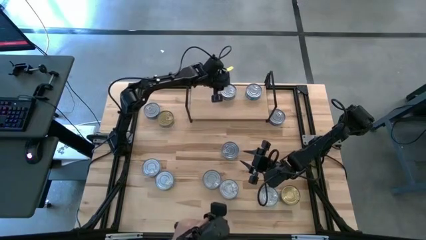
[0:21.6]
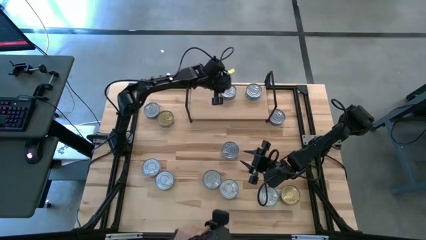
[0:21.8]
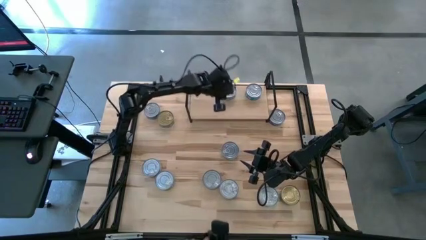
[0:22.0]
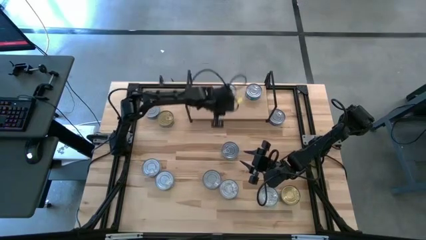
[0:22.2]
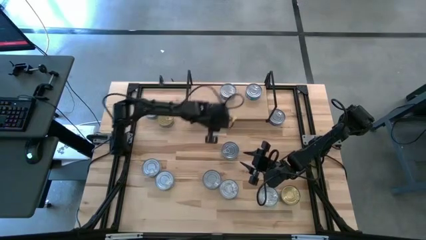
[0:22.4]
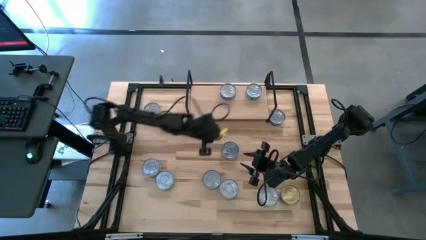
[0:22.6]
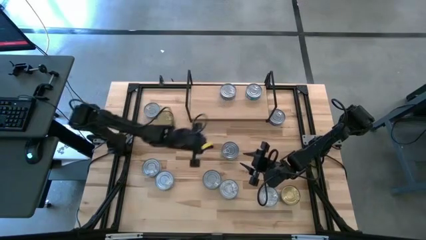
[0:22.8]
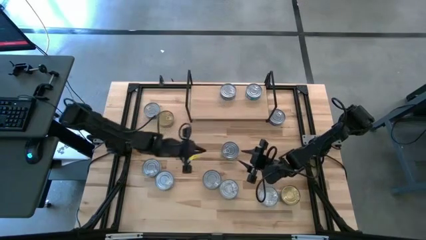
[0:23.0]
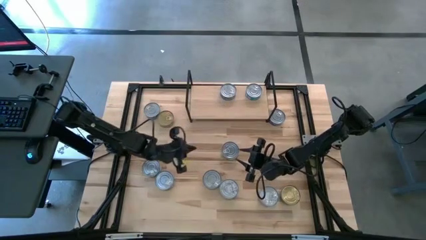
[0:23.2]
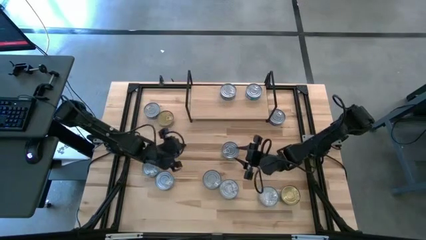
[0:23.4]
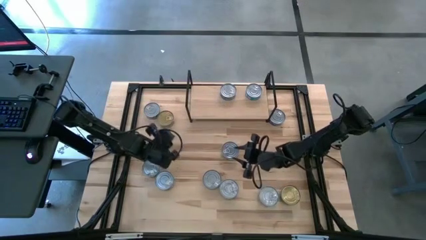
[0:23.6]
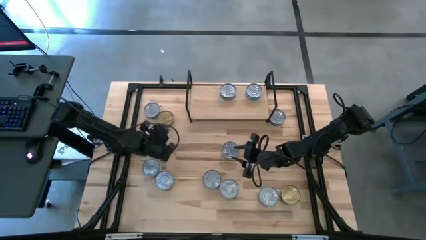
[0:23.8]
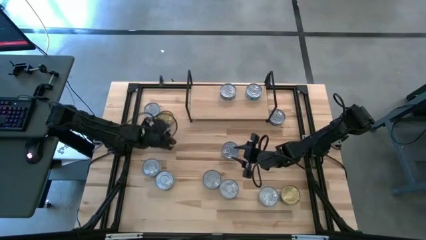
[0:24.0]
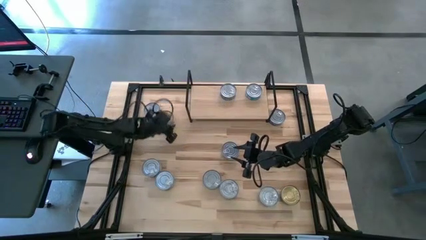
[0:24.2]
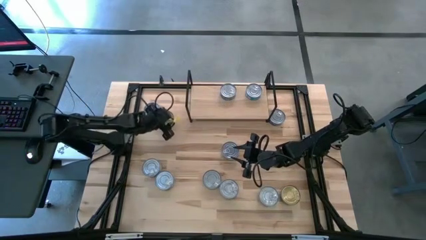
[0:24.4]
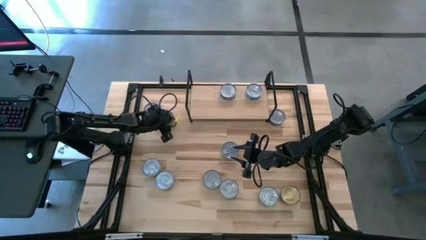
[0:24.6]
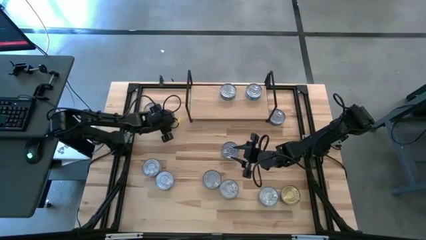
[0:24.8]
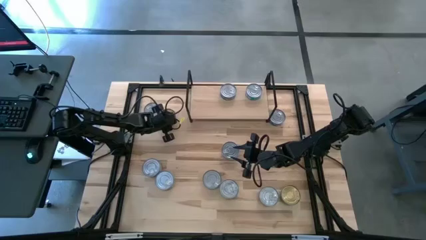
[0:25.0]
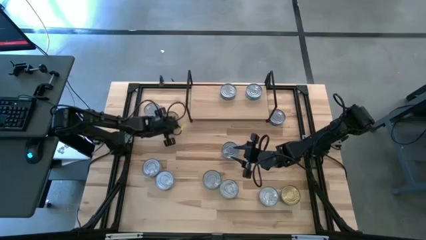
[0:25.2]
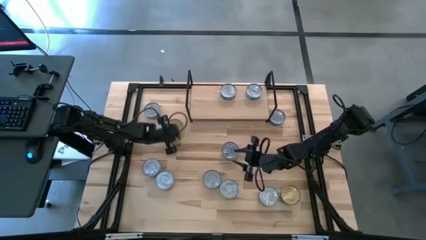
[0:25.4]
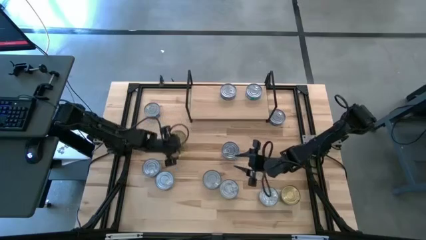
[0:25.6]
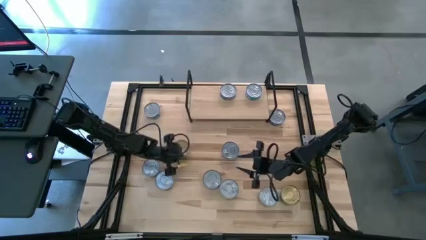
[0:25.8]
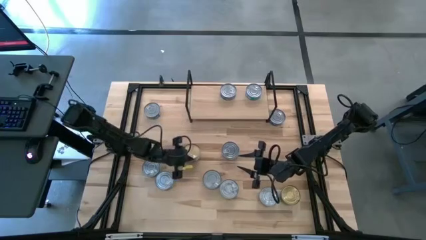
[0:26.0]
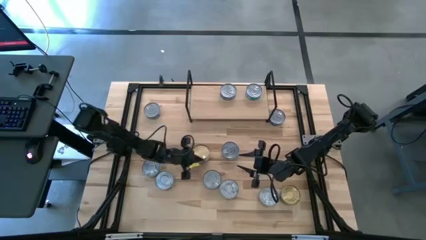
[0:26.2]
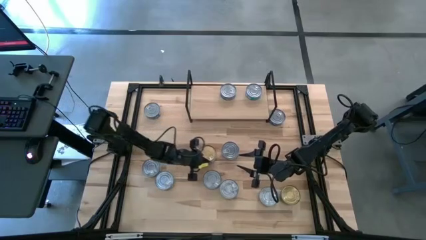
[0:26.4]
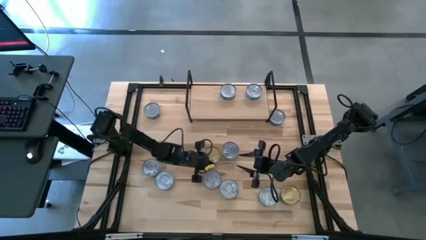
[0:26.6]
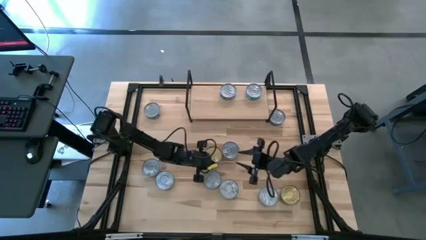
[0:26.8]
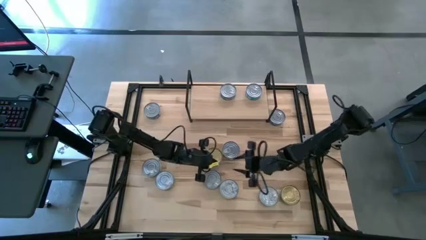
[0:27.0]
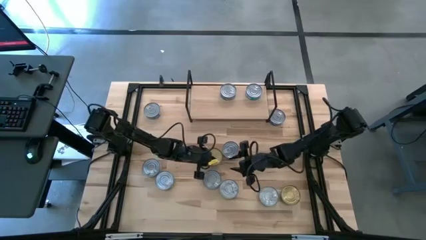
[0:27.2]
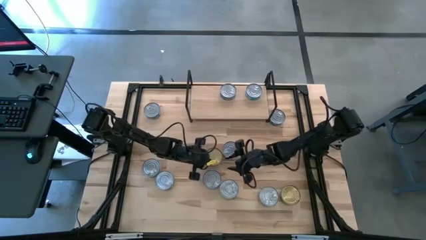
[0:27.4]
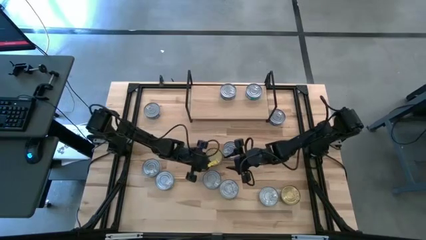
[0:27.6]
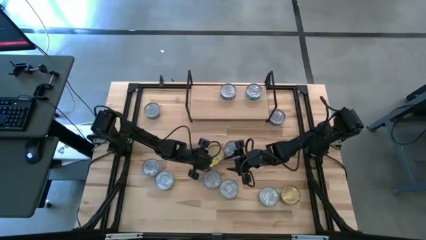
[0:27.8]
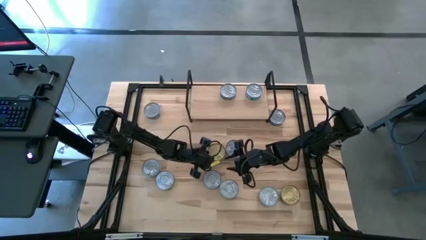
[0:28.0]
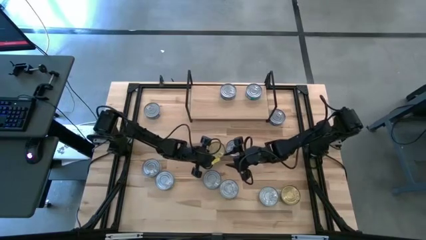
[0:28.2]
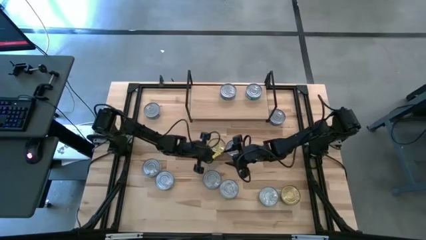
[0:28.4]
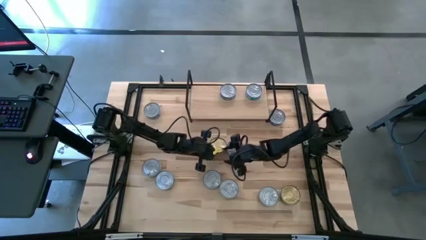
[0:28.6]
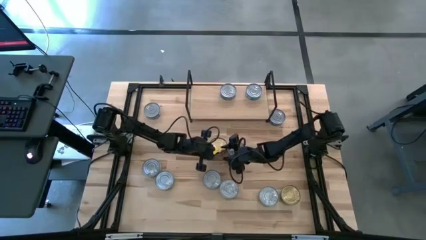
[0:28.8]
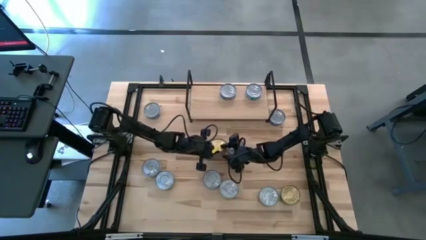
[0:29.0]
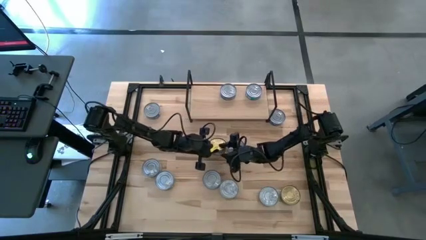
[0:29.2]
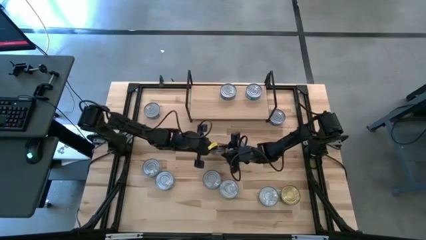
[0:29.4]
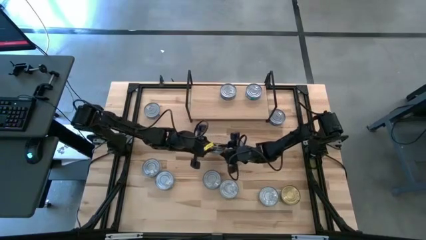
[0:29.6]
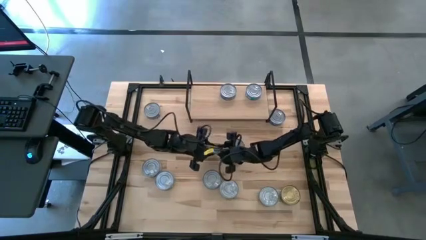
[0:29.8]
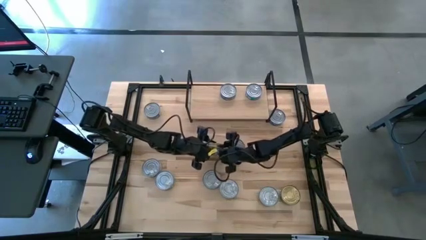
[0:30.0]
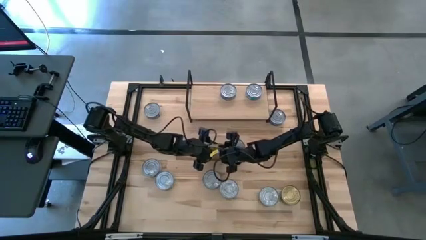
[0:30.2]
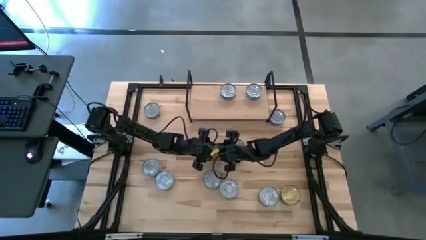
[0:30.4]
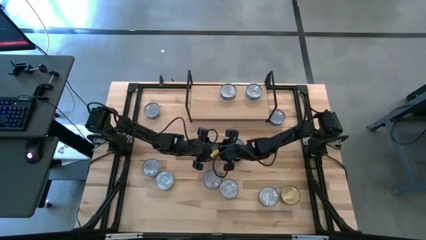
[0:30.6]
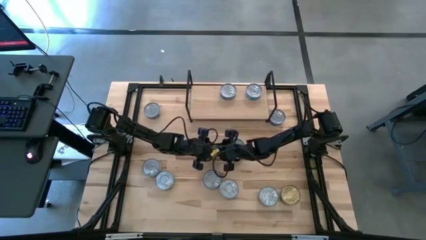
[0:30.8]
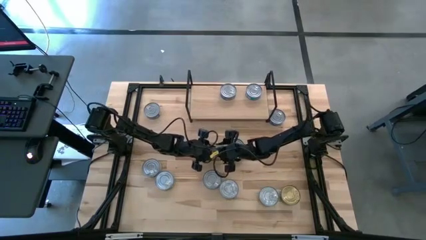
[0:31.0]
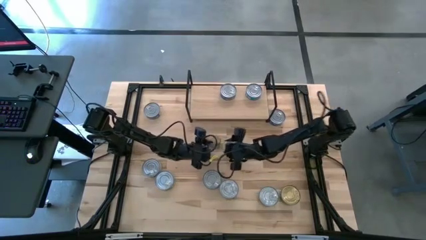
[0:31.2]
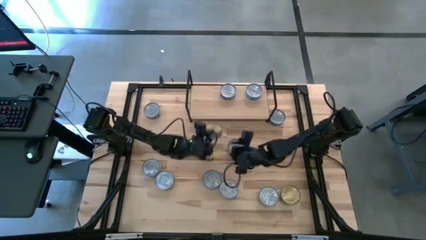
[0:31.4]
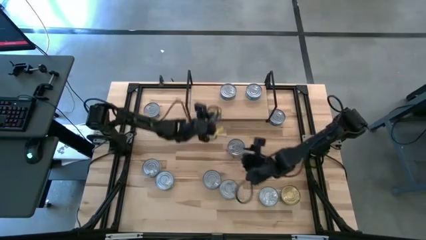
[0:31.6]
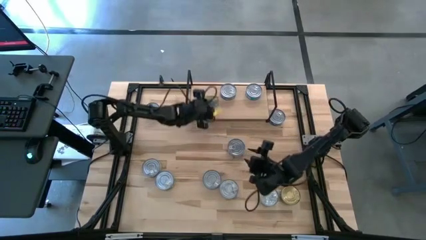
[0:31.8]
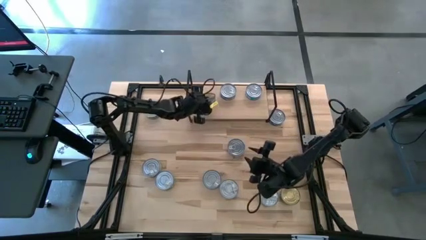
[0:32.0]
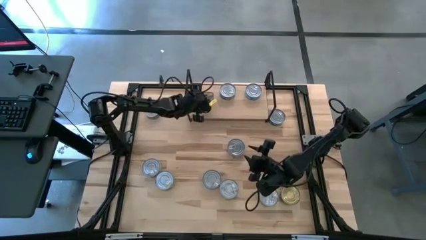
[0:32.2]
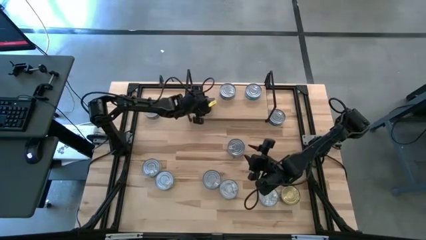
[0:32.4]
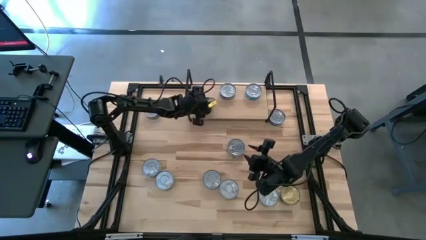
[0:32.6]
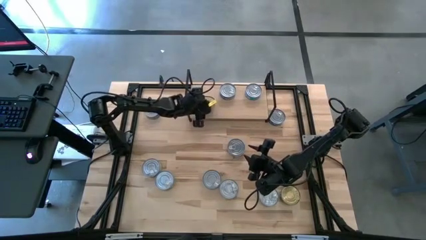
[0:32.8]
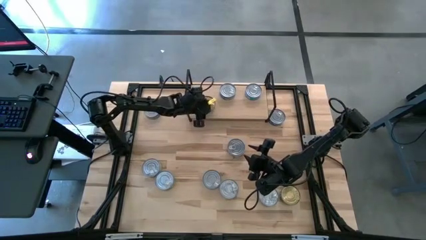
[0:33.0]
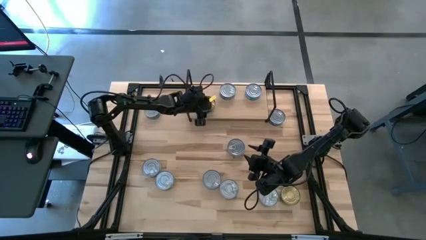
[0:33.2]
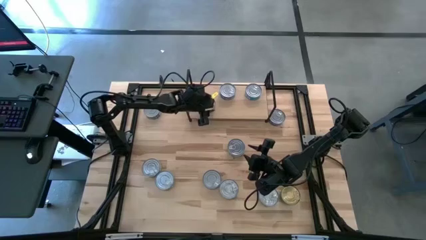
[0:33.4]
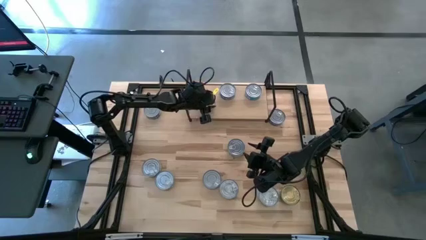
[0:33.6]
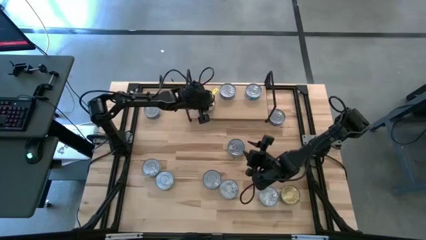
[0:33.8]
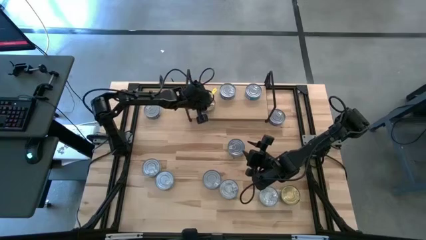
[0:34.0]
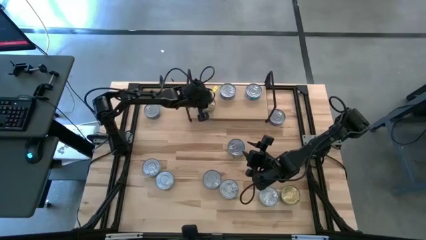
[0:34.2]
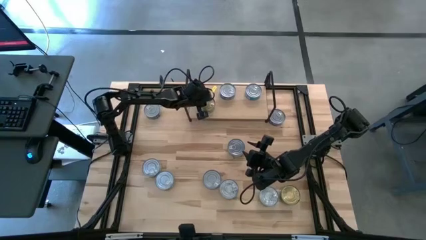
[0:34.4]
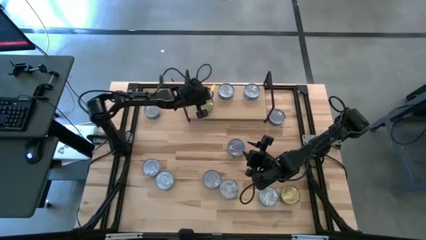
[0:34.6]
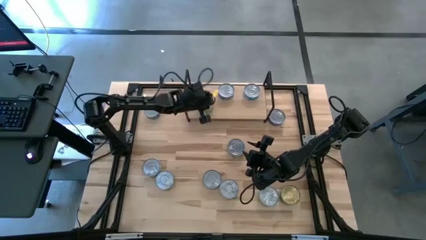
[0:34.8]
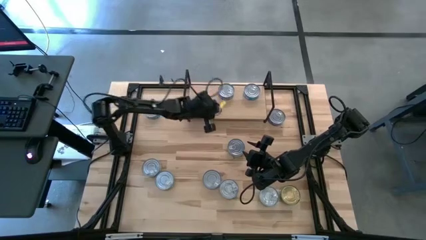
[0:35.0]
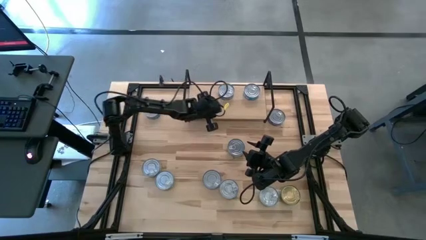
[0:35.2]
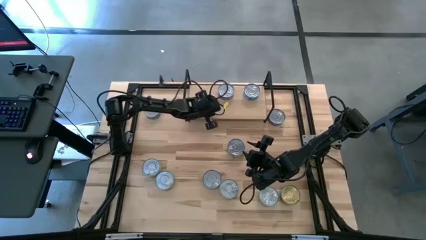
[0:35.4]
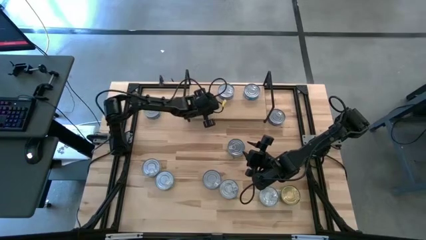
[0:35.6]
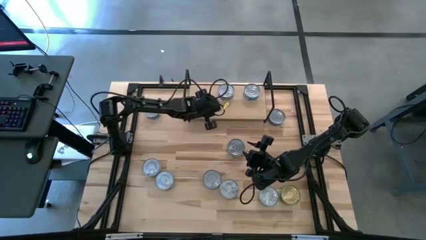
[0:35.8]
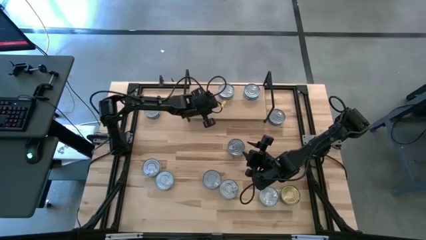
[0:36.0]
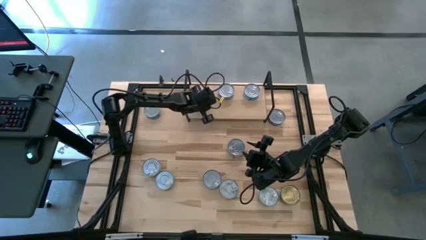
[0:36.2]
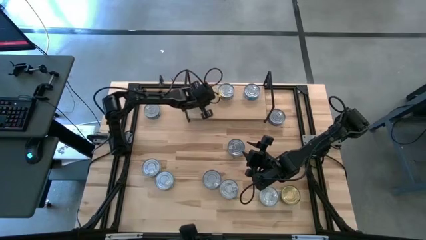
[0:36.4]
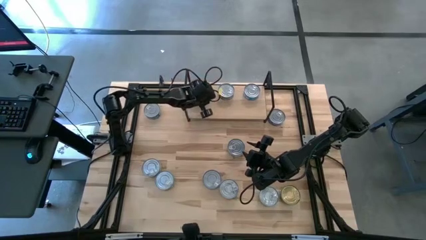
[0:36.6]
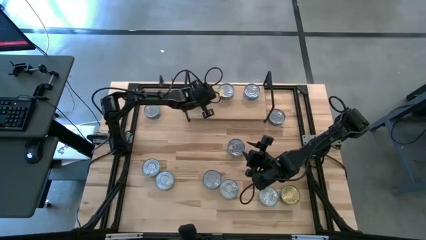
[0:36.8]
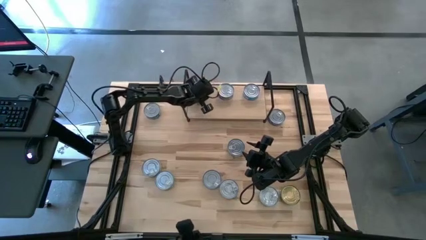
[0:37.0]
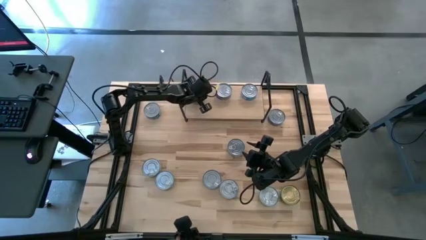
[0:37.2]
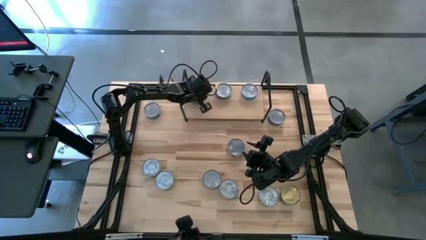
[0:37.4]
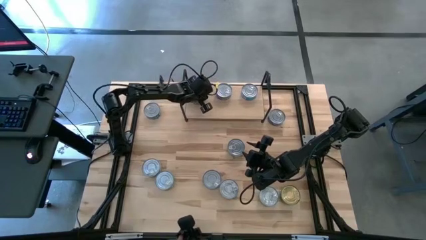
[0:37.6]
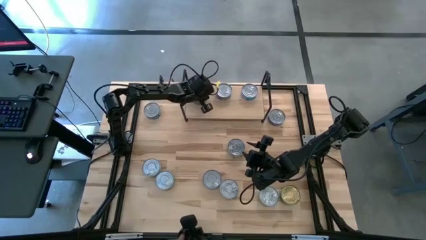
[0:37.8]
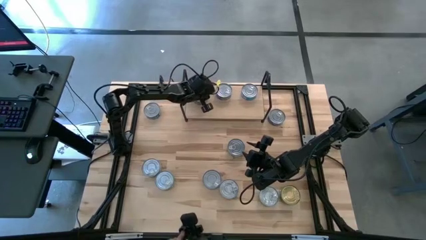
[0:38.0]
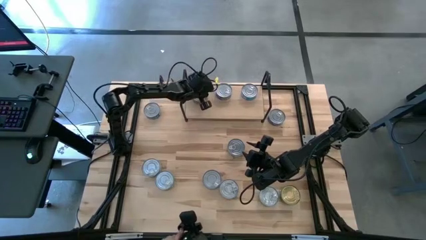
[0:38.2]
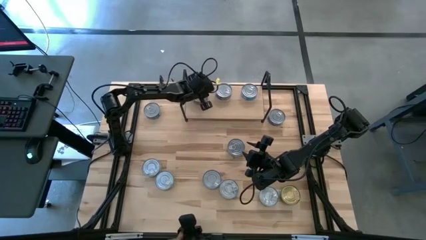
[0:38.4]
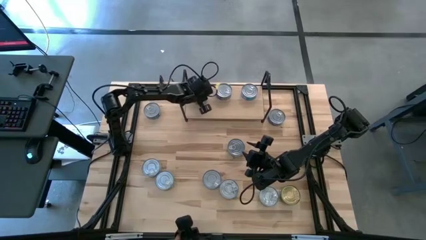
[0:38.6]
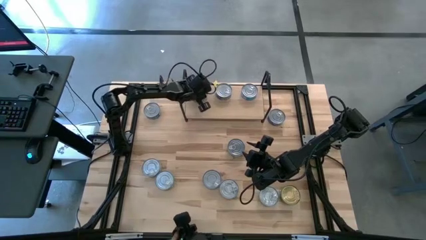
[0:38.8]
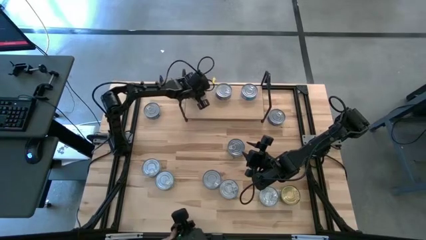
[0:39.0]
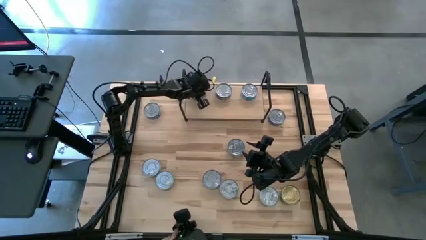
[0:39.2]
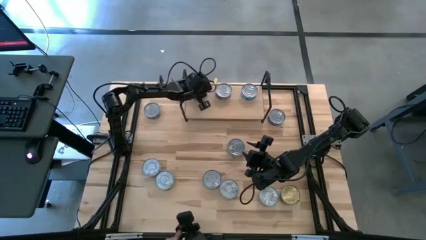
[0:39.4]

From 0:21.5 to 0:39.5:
Task: Stack canned seafood by type on shelf
Put the green tuna can on the shelf
